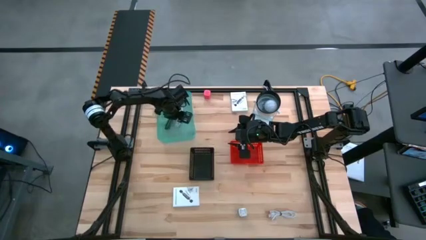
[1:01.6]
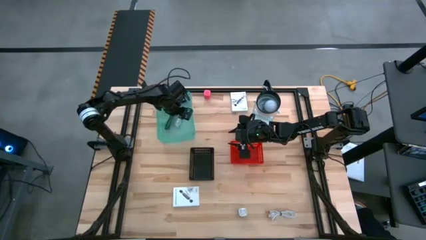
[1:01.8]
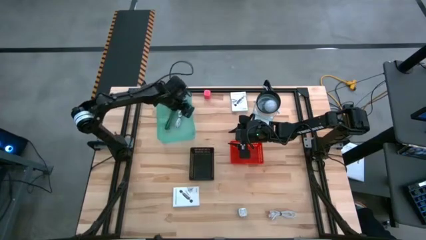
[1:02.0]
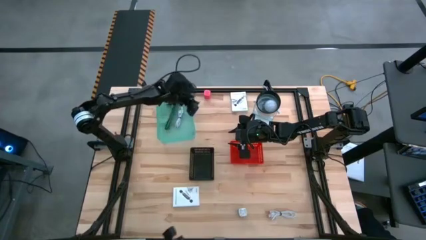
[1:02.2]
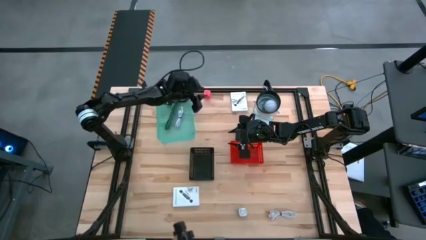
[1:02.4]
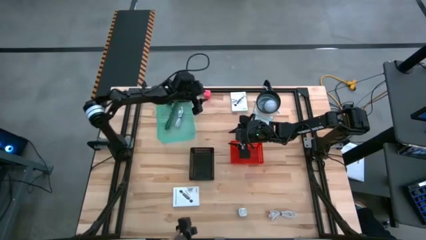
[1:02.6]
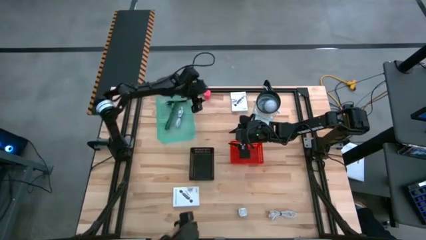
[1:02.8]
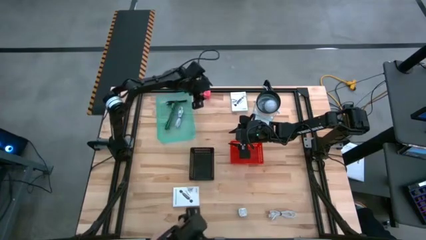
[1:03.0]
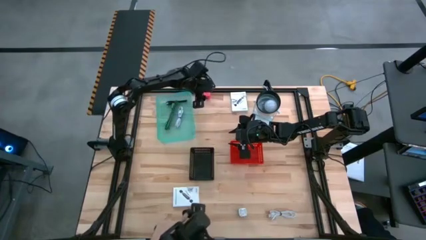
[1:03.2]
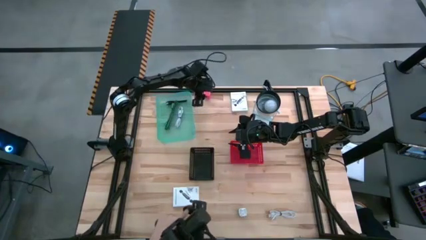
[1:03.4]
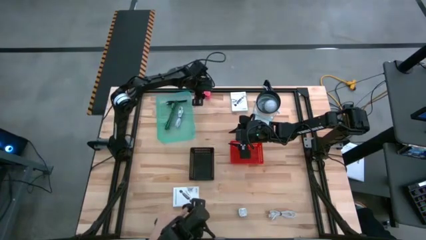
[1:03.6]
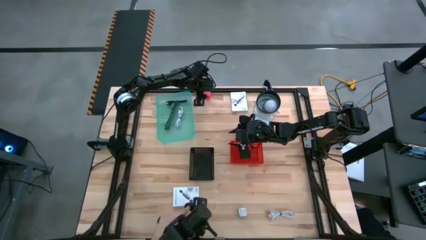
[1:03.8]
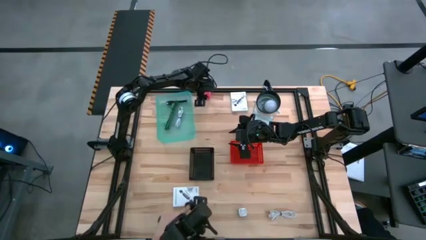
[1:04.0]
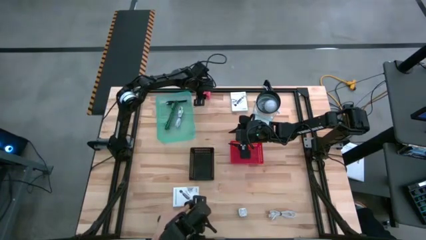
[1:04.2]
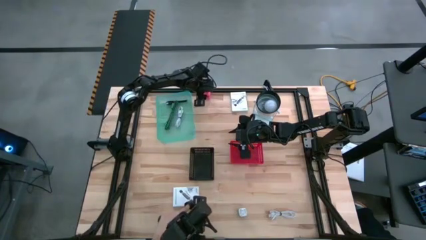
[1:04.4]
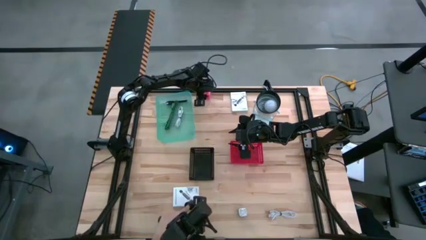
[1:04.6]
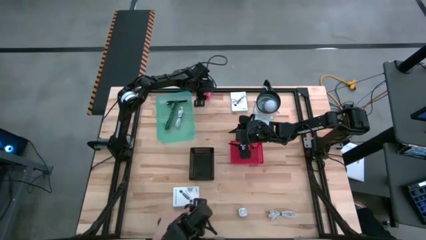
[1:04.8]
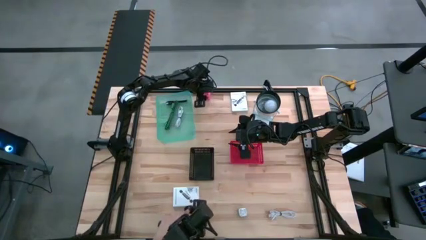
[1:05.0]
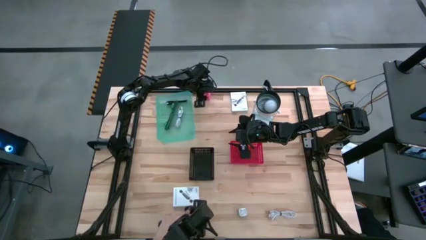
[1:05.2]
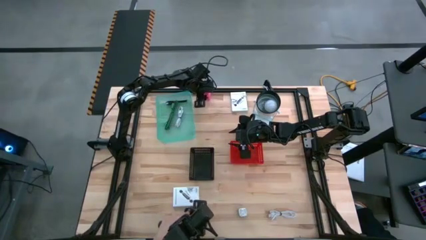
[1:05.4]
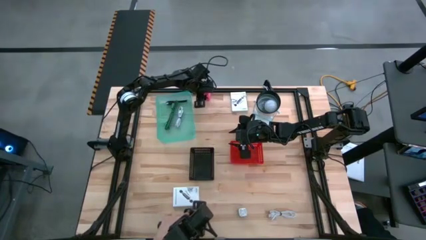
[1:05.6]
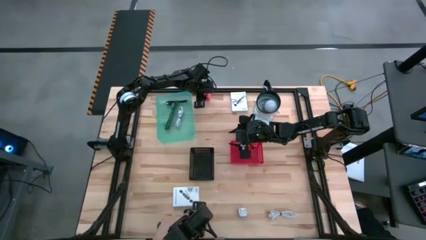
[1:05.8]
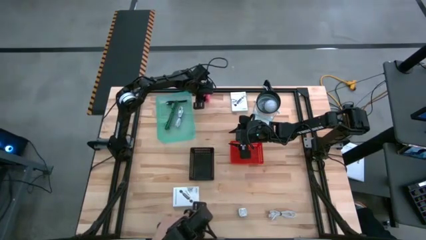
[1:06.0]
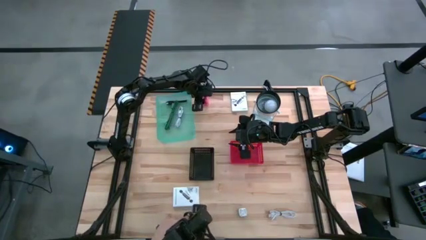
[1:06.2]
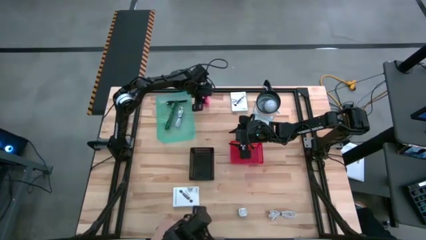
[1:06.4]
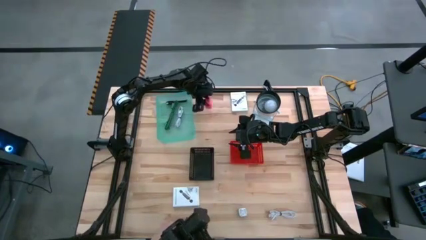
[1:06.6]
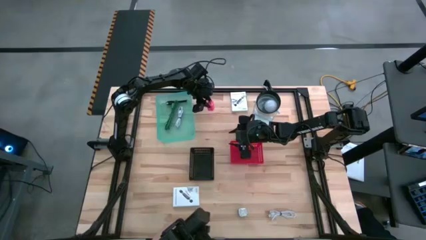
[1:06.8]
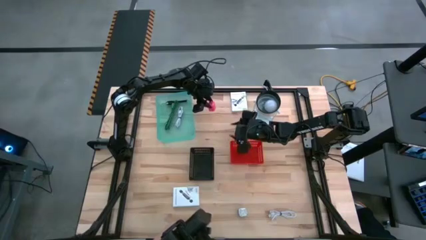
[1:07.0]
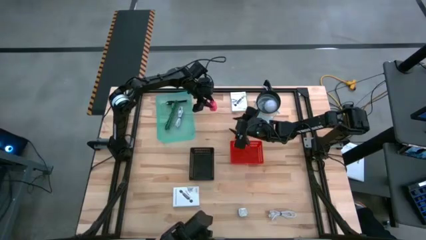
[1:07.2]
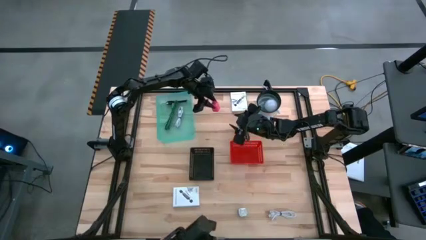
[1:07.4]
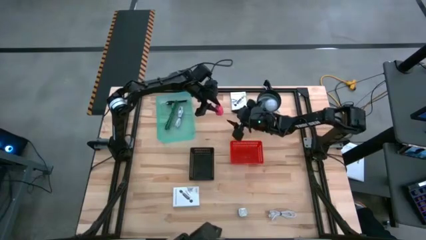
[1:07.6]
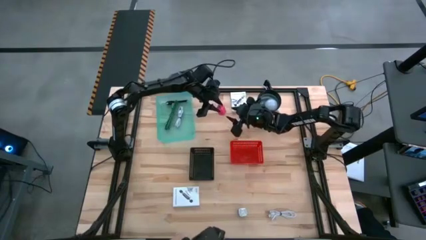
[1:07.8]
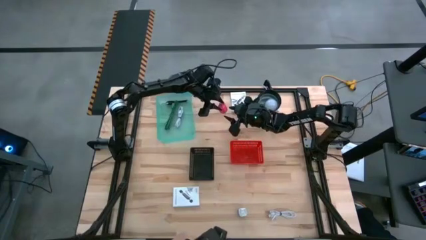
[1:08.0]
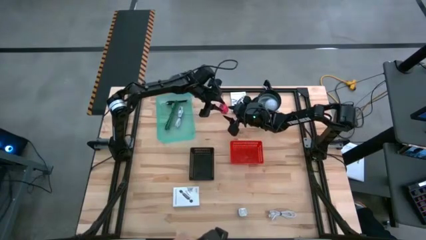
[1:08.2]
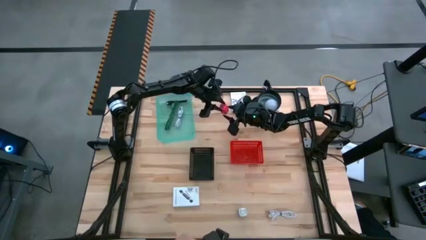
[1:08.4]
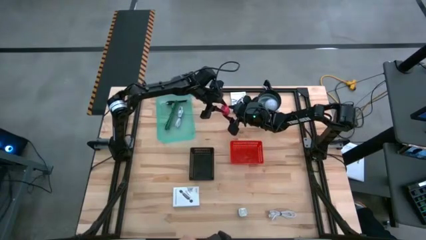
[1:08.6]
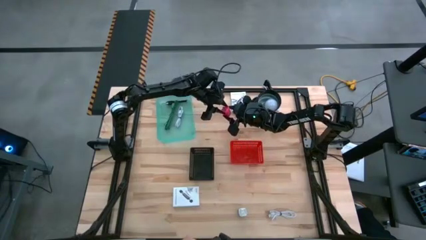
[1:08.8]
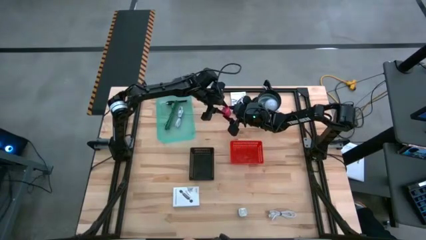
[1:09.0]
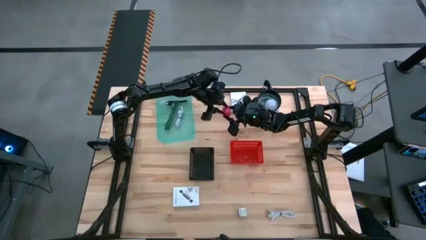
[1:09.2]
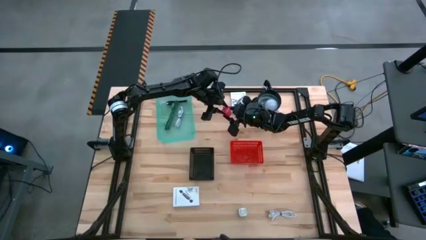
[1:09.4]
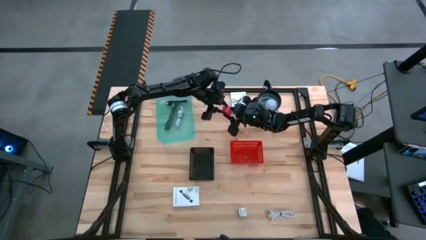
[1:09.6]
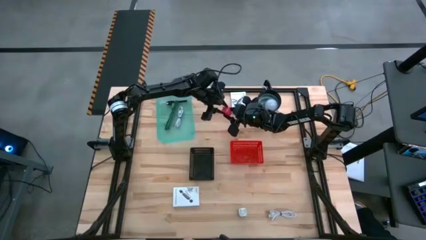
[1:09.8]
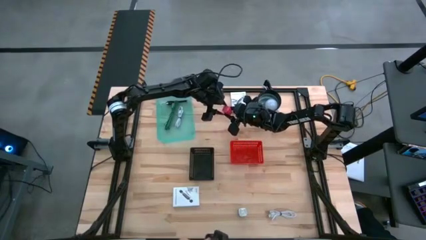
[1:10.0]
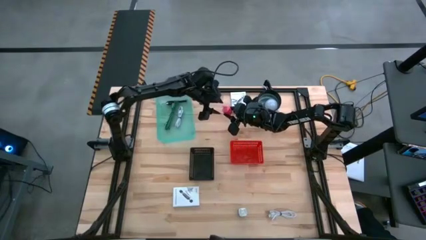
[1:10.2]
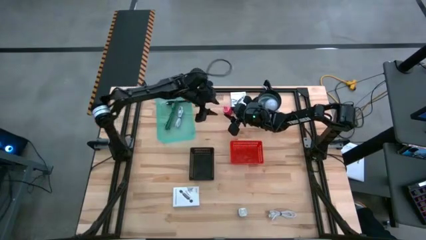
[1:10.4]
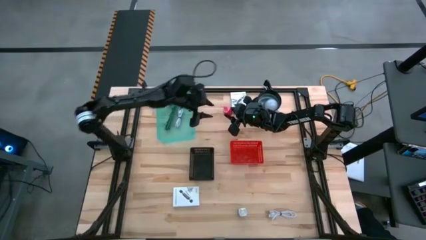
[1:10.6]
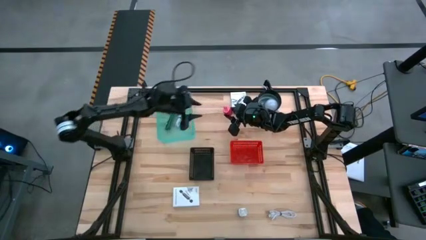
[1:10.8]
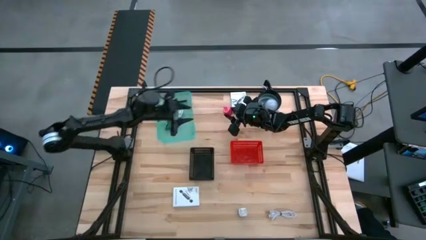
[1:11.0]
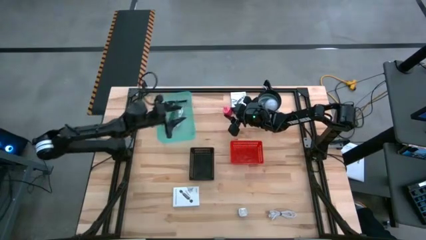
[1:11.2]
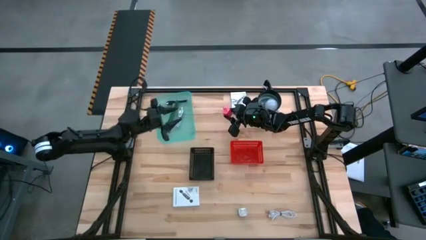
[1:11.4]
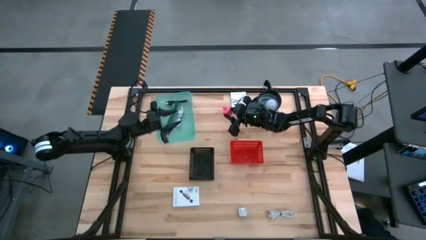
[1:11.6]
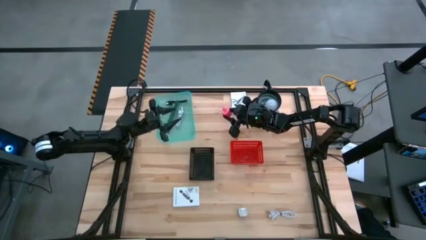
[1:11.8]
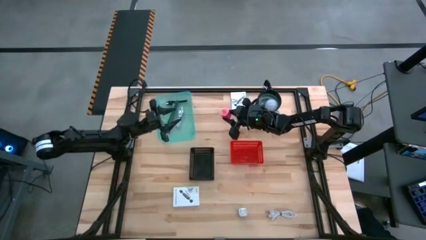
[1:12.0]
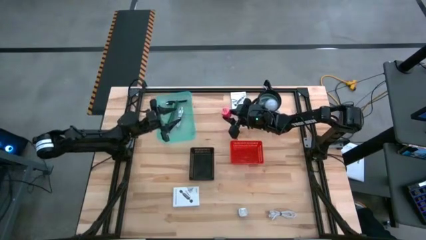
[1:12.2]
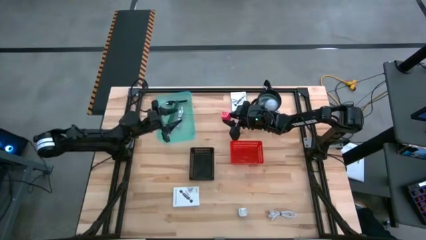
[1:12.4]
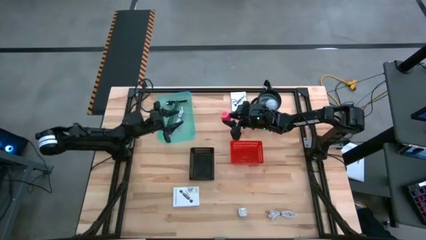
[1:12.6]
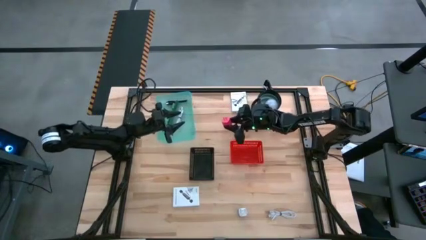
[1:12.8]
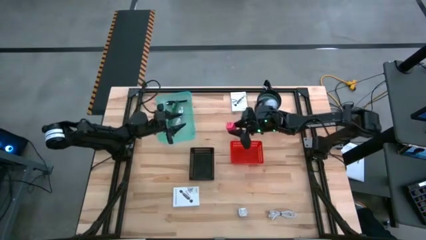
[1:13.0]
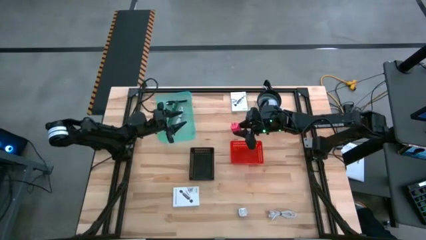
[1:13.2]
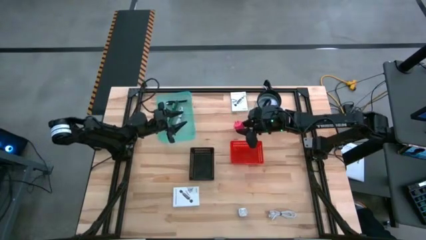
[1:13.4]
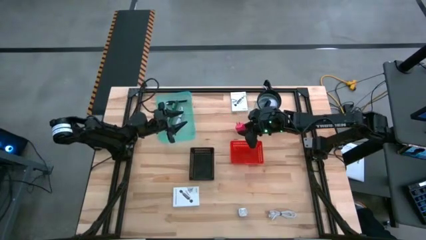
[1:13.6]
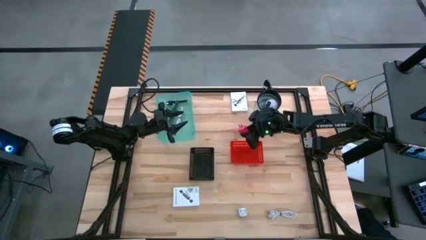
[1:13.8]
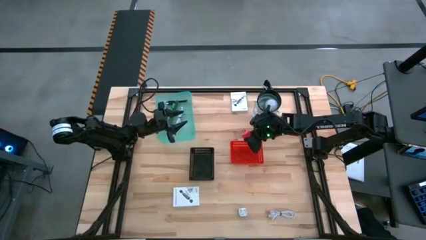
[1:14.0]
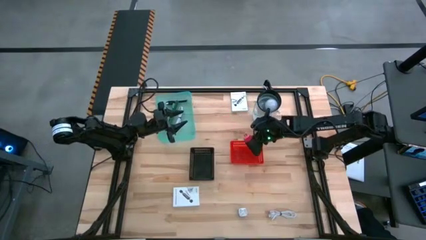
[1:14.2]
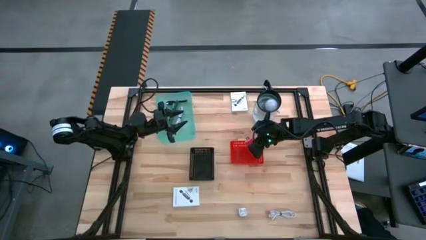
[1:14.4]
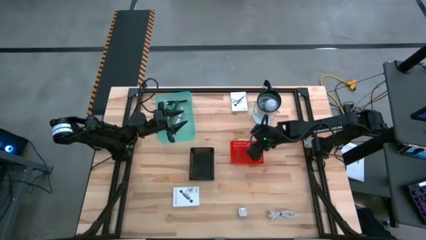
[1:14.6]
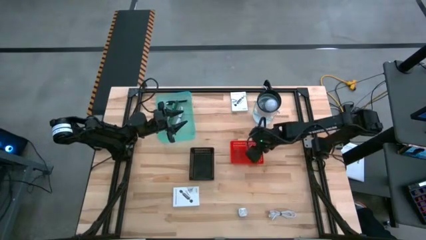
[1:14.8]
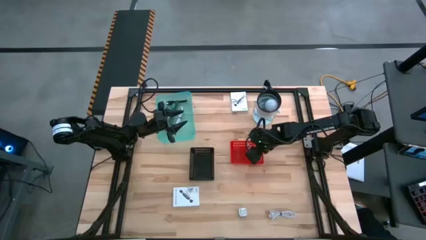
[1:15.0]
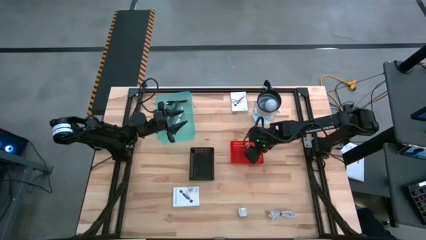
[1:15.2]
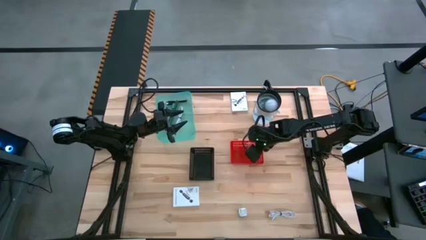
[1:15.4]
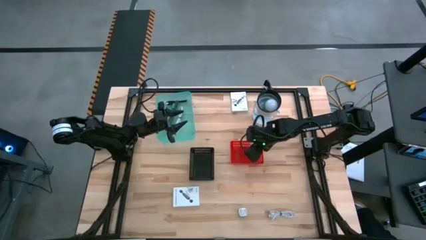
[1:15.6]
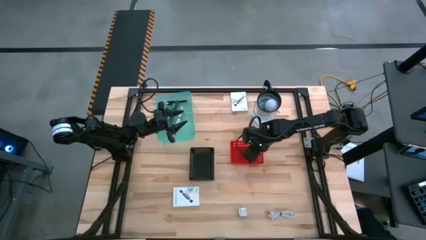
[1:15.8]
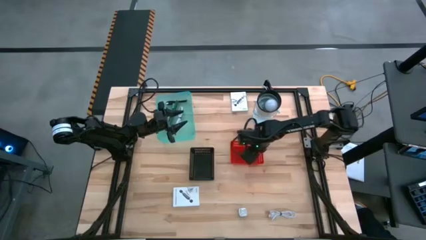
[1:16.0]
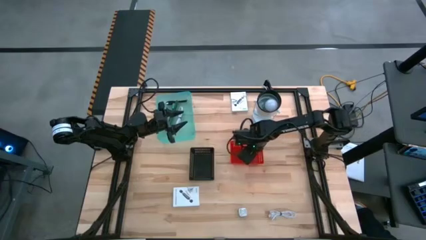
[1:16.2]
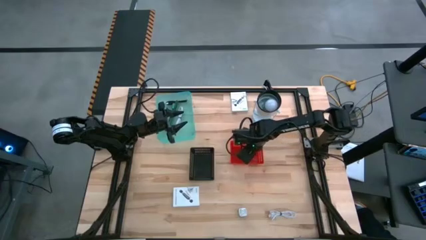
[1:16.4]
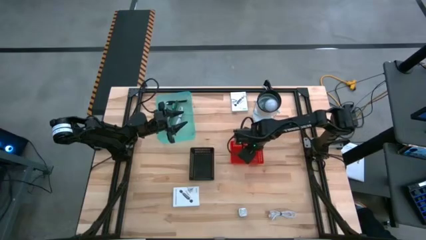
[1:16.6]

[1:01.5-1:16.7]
Task: Pick and place items into bin
Put the pink charger adapter into the red bin

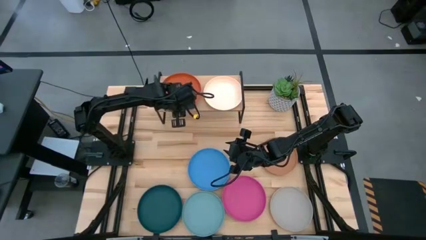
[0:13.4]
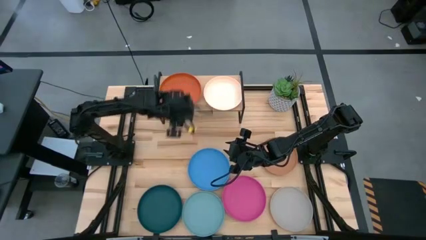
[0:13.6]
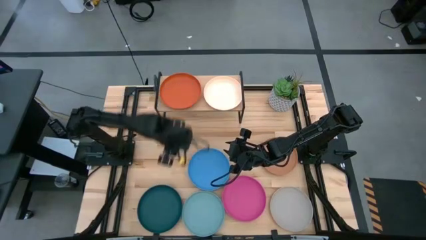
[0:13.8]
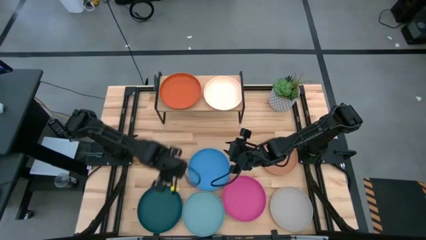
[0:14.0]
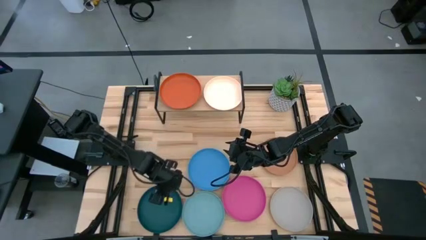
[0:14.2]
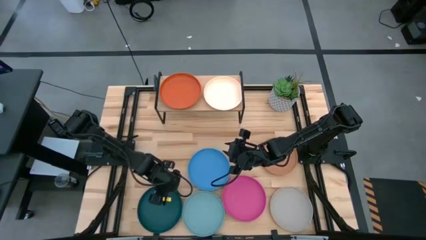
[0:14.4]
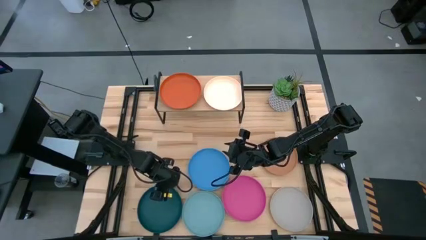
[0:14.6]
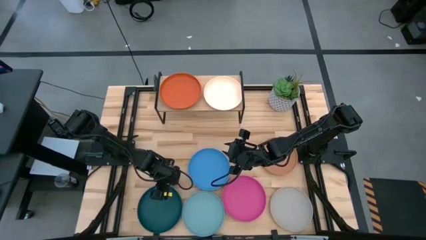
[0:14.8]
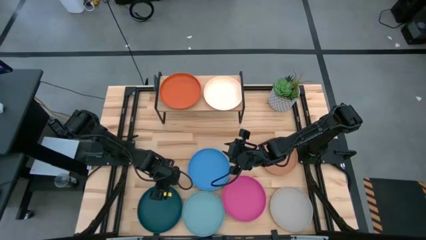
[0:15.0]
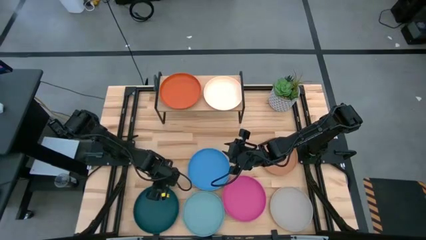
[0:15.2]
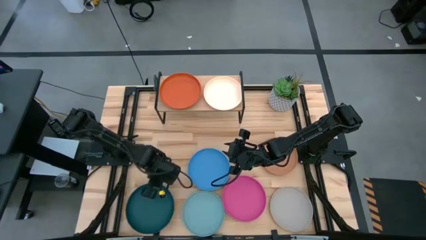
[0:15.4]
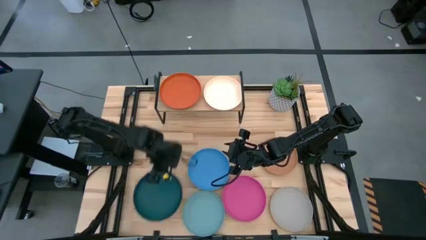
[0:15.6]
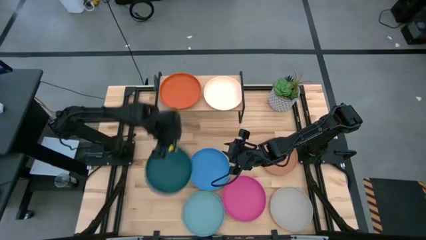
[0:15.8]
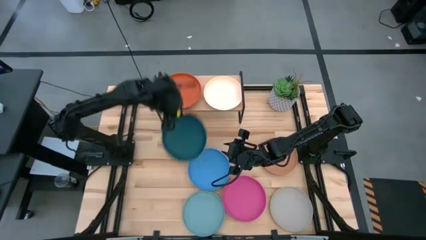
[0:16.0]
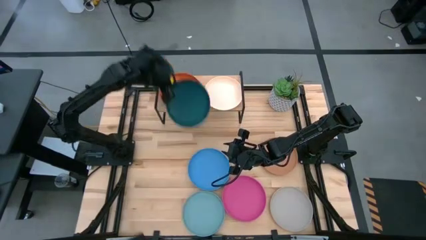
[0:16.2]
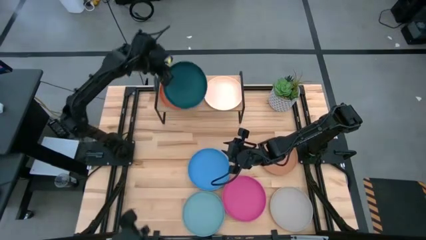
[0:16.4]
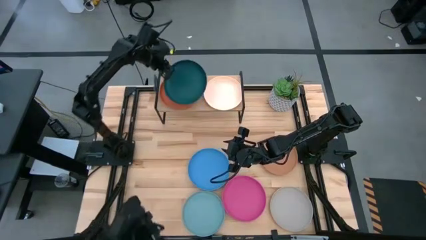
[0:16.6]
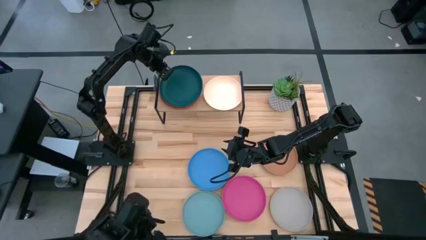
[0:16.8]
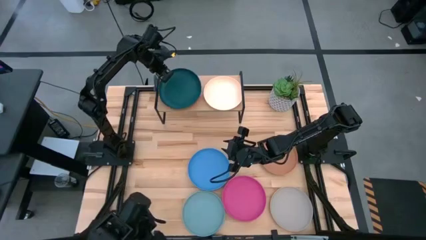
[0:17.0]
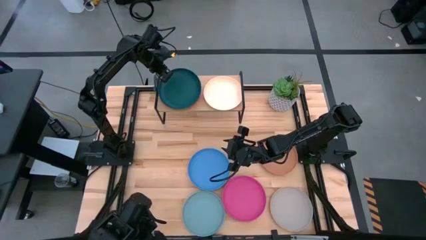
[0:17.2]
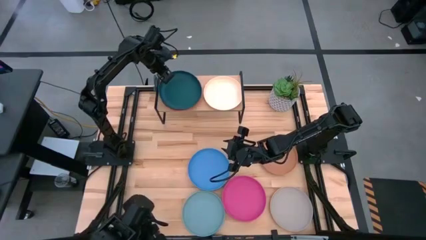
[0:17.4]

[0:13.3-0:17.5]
Task: Place and stack plates onto a shelf
Stack the green plate on top of the orange plate on the shelf
